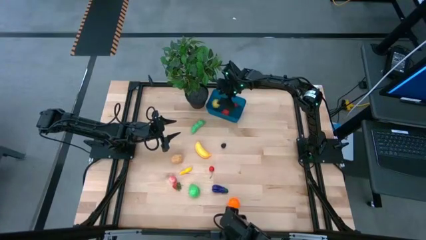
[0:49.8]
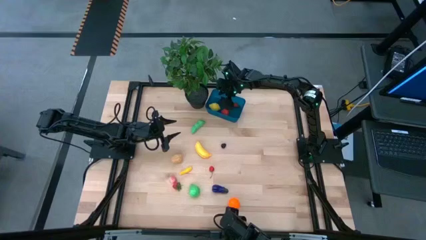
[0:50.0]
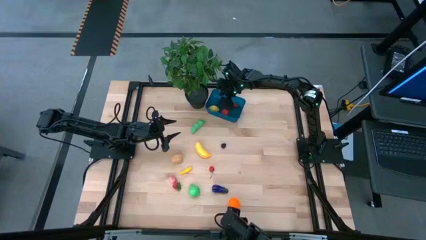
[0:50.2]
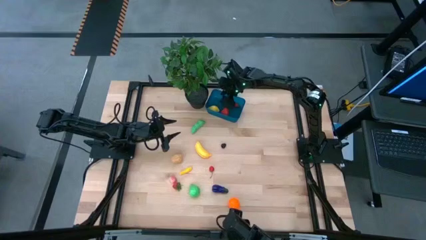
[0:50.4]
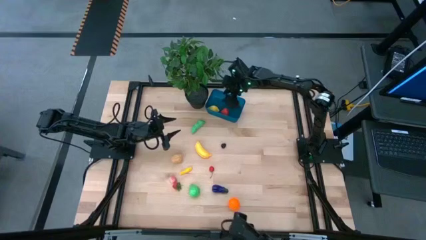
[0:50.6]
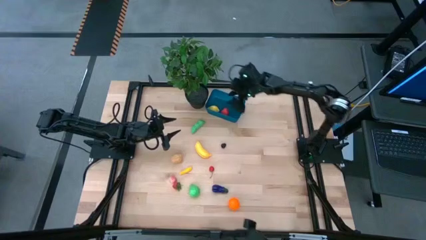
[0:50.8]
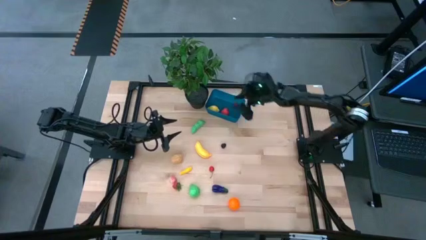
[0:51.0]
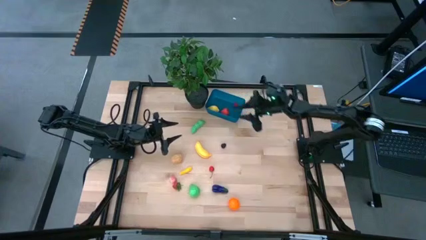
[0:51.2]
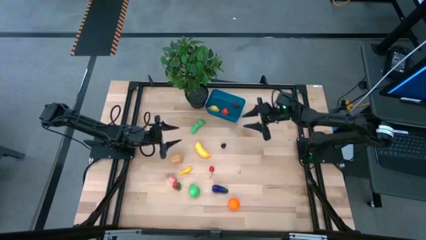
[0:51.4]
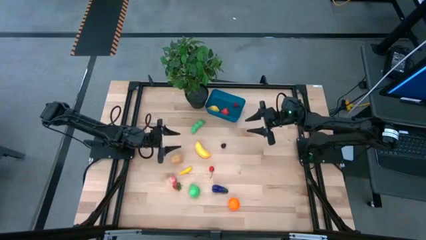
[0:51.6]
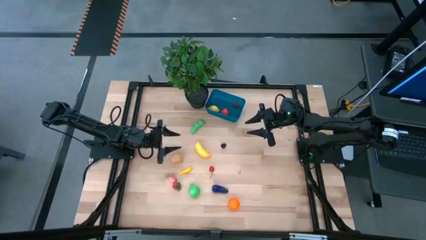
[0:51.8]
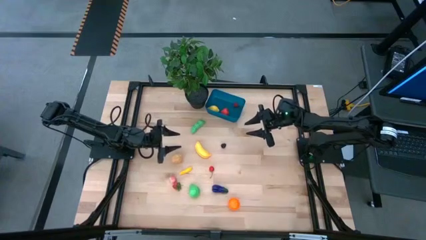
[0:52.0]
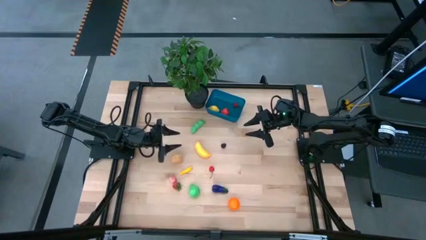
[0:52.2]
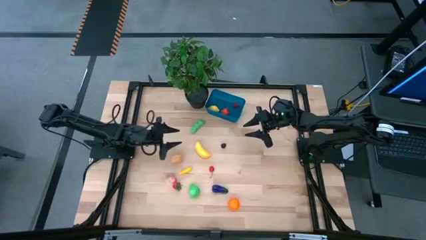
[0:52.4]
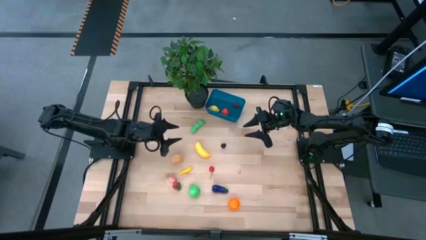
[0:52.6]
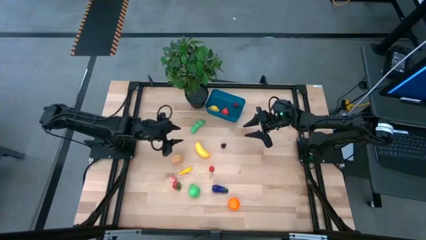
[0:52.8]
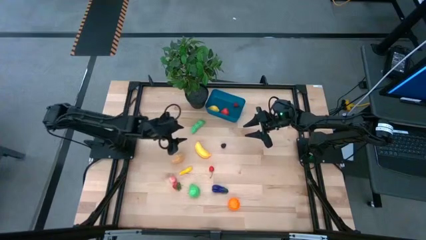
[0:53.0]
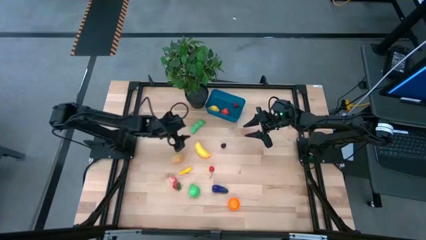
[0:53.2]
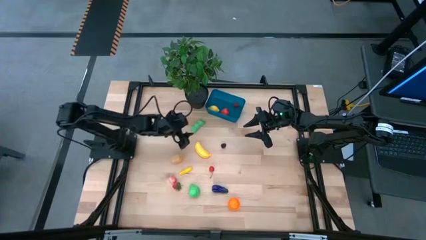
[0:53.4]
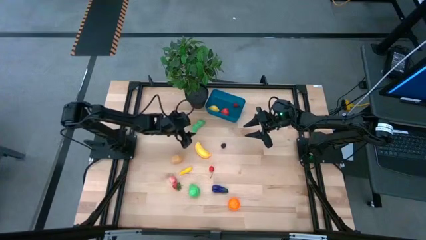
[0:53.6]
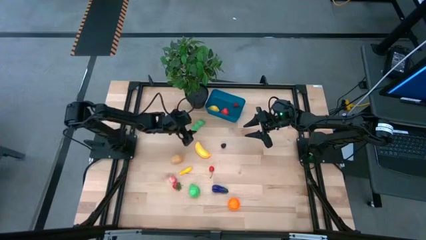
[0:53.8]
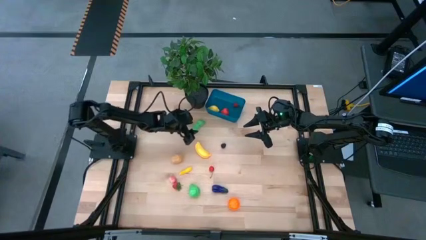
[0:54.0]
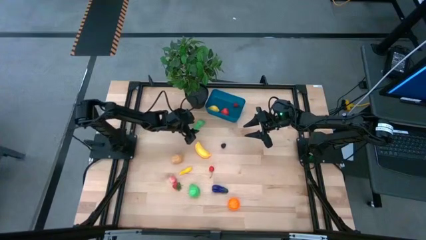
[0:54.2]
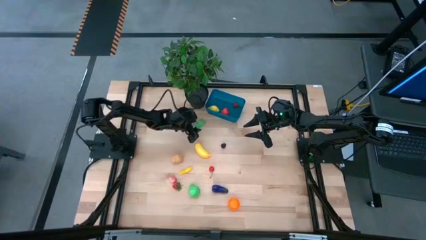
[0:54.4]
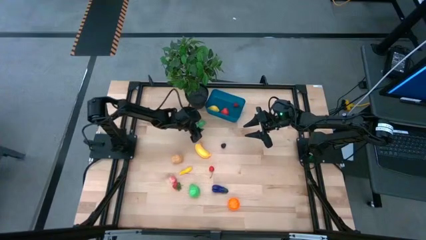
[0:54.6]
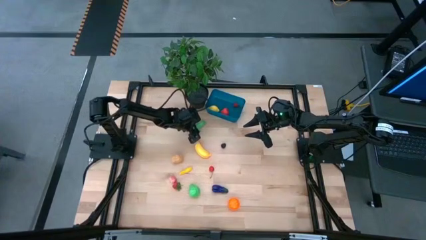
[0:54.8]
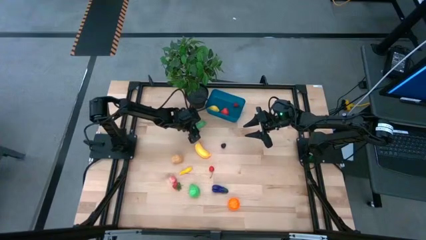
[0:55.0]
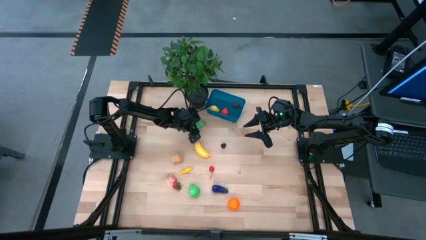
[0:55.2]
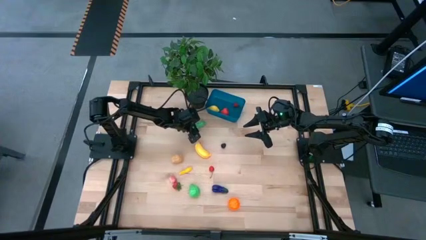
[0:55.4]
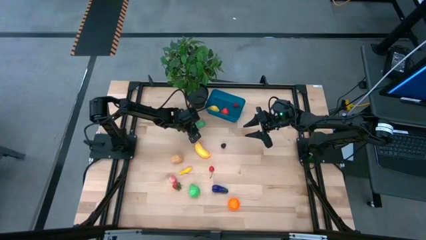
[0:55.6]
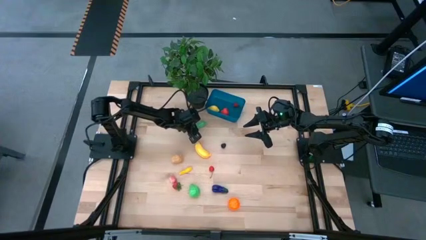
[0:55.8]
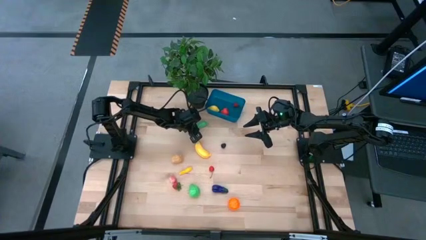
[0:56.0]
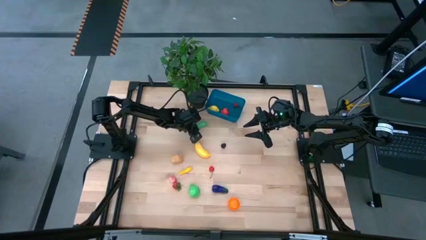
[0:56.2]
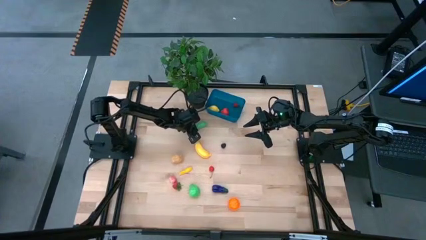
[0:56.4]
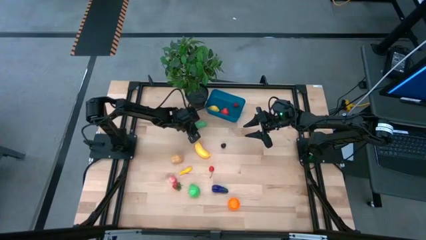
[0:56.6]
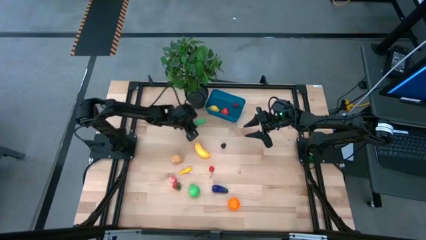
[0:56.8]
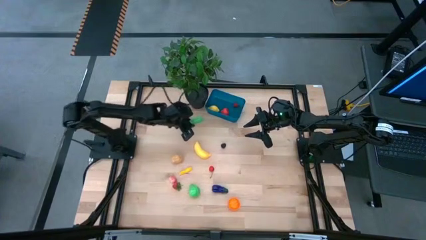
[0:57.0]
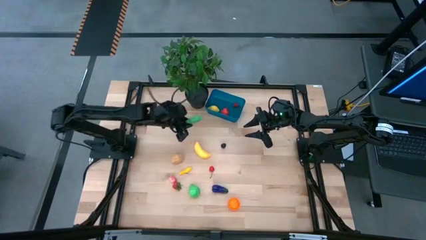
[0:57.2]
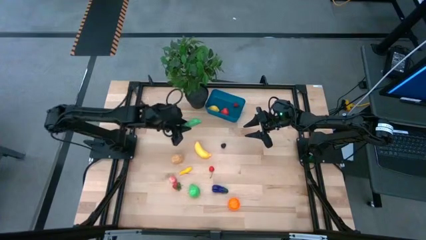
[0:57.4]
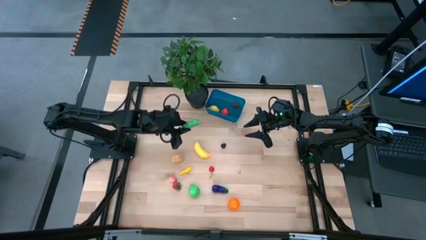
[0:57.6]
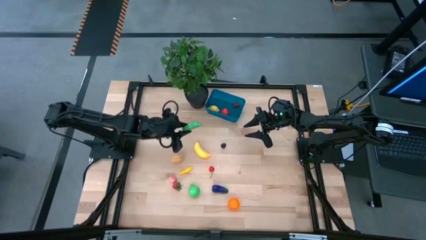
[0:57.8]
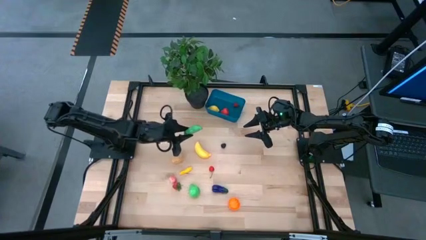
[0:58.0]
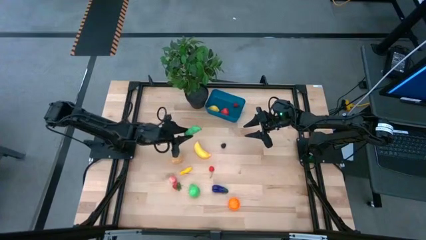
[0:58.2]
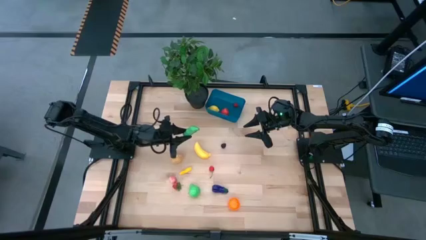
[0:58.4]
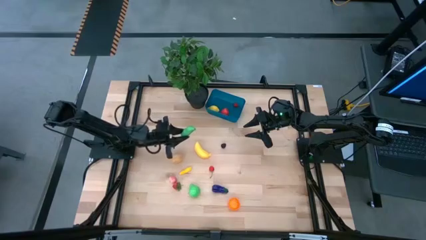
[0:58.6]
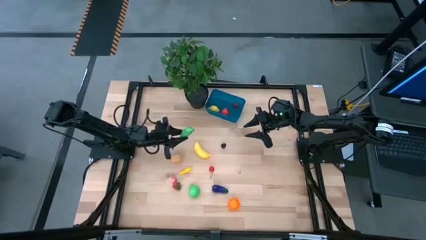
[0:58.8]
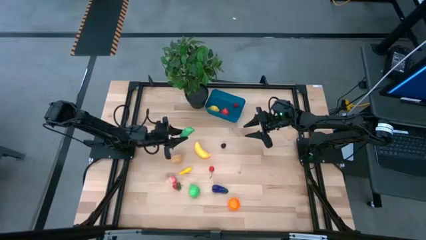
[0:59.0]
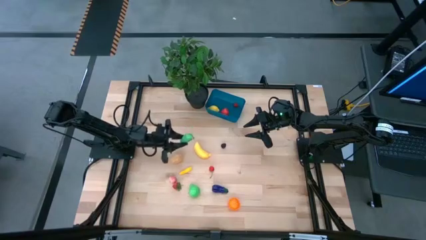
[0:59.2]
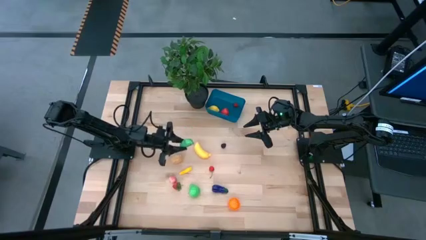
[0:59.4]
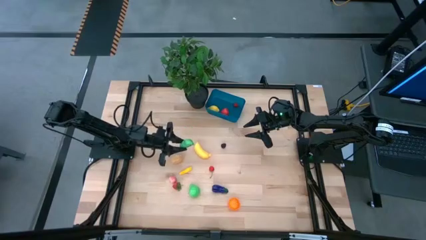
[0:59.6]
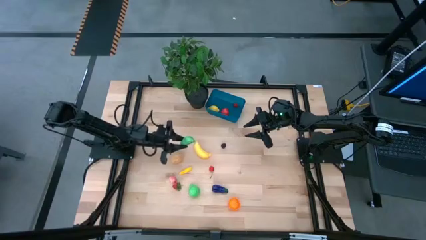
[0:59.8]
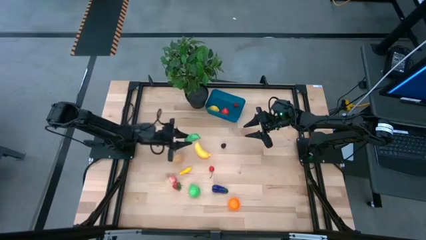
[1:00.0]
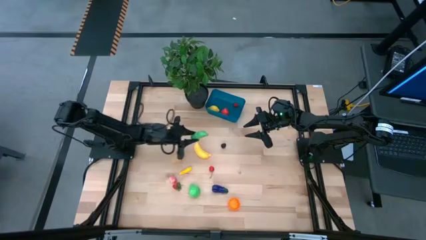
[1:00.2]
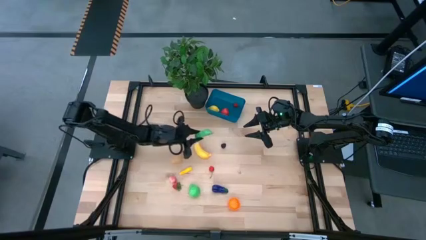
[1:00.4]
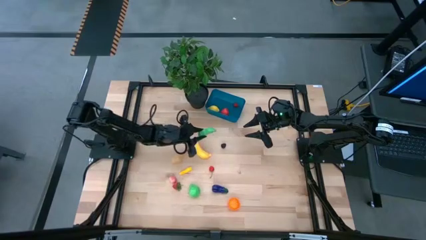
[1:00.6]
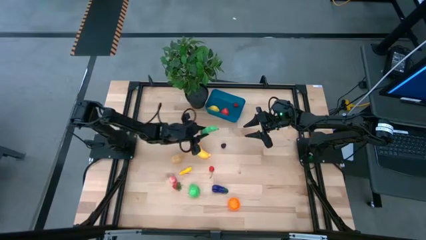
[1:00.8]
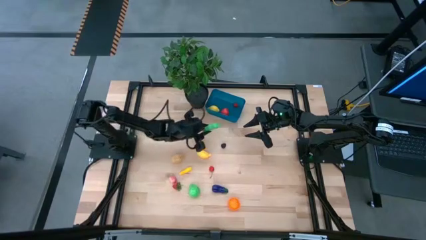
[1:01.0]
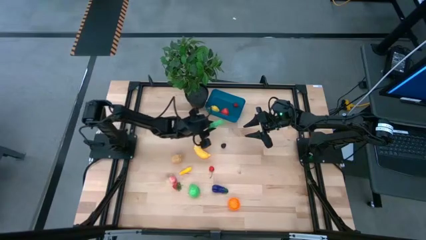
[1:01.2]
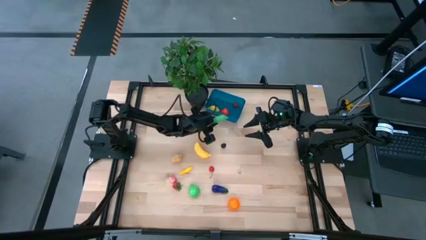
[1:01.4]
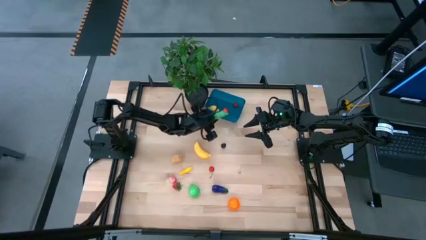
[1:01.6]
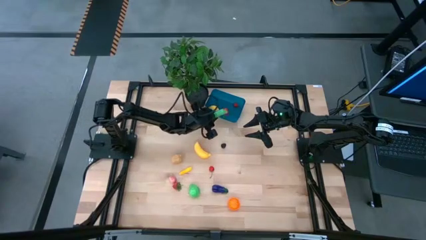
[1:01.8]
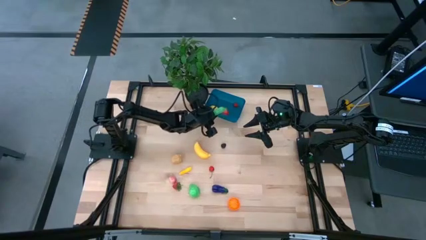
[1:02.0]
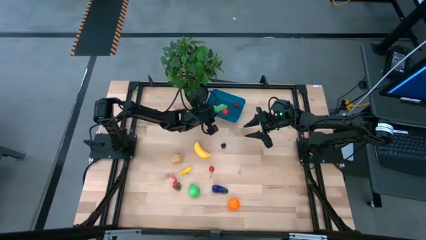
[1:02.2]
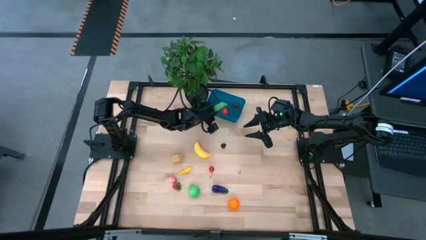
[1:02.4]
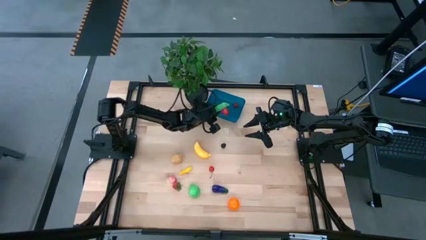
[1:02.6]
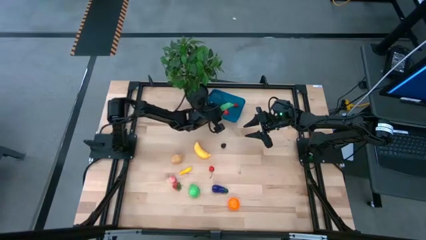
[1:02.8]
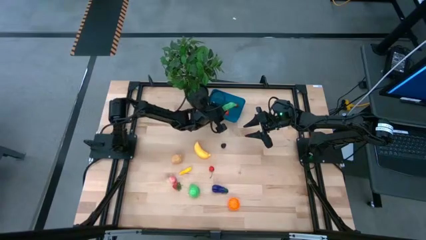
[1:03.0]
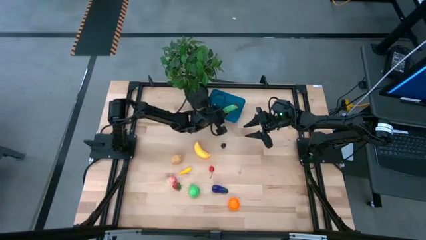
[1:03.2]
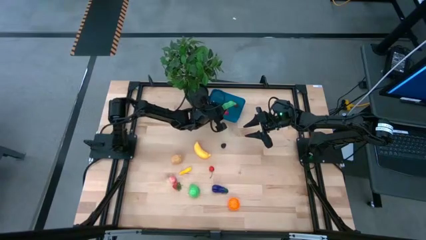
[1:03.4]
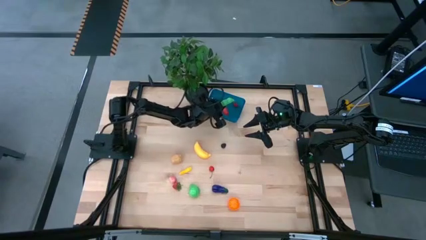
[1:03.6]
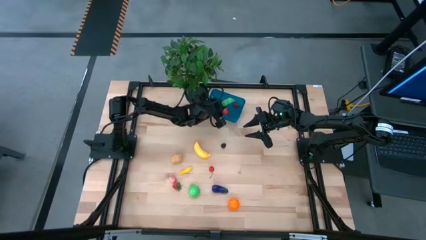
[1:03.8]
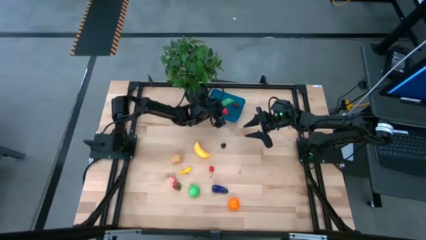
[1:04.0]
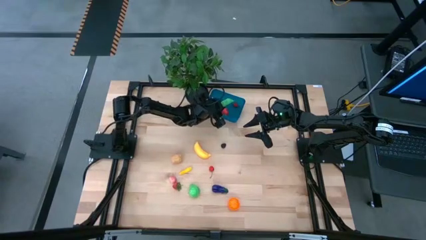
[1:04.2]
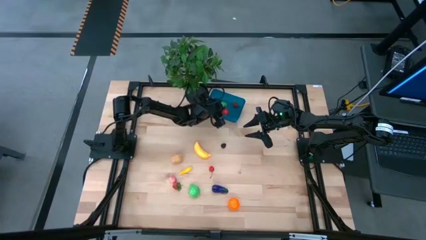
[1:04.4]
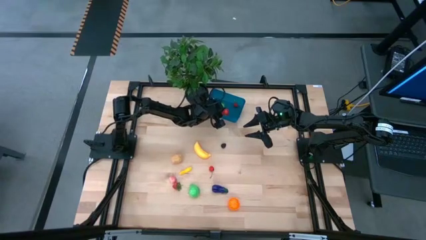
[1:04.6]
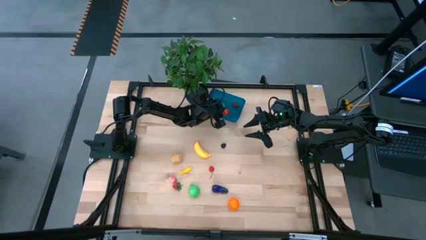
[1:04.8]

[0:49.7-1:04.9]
Task: Pick and placing Produce into tupperware
Put the green peas into the blue container
